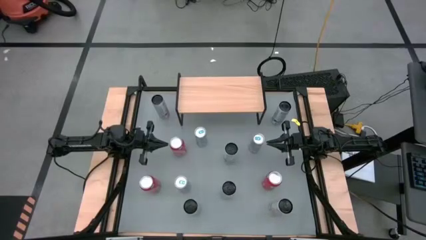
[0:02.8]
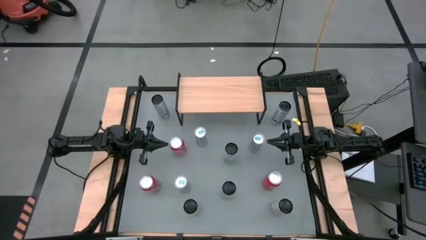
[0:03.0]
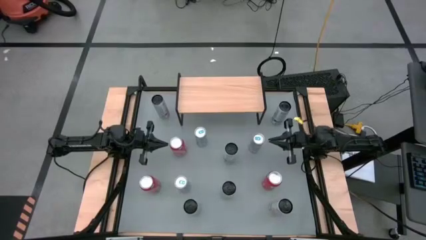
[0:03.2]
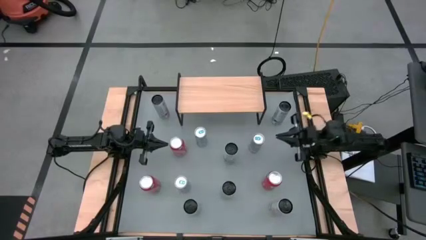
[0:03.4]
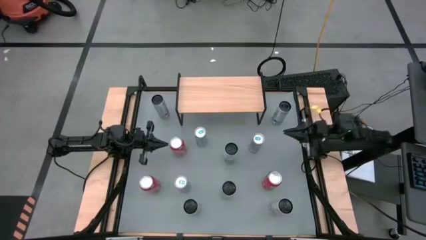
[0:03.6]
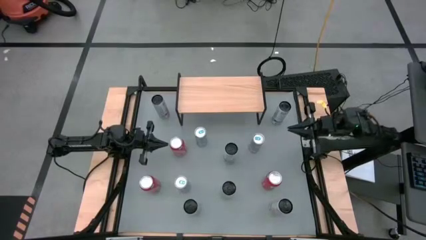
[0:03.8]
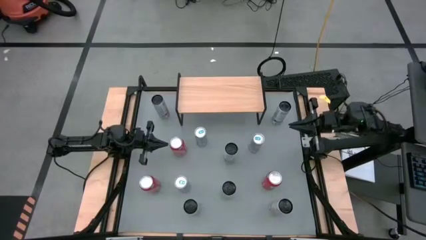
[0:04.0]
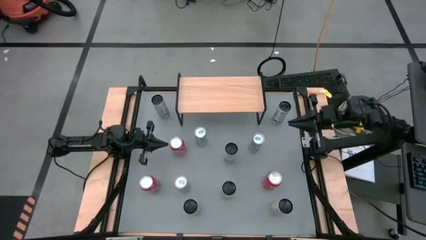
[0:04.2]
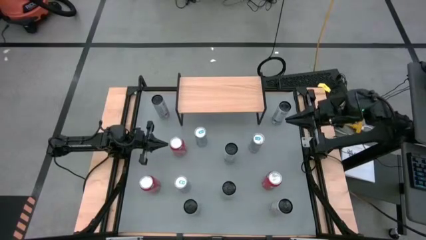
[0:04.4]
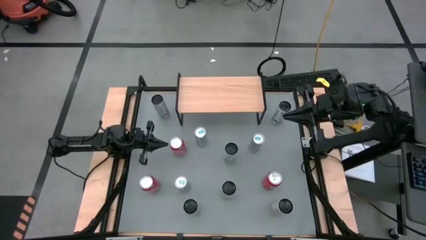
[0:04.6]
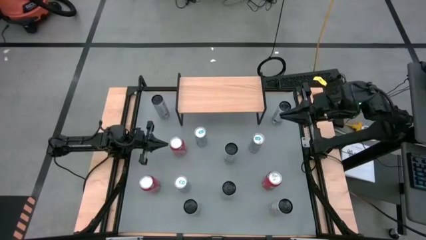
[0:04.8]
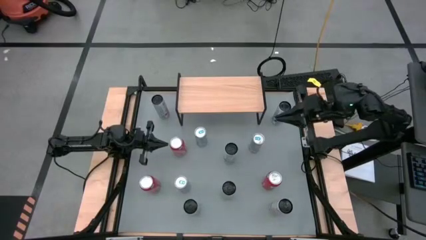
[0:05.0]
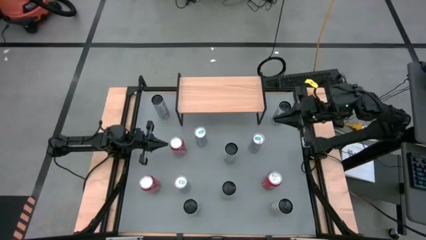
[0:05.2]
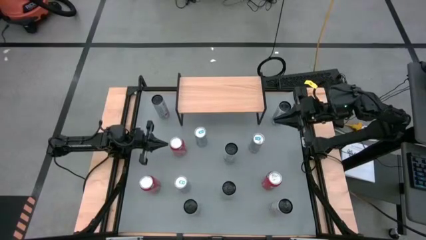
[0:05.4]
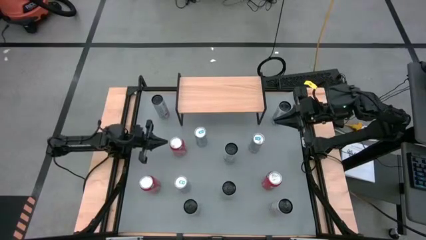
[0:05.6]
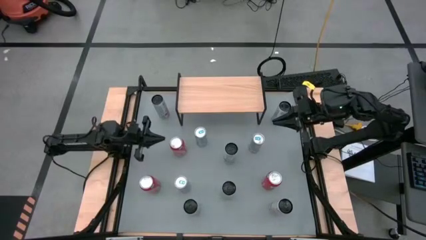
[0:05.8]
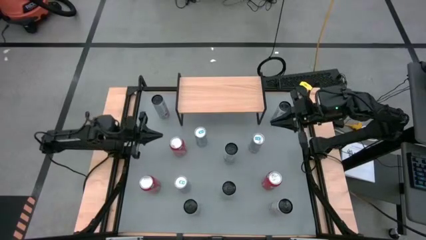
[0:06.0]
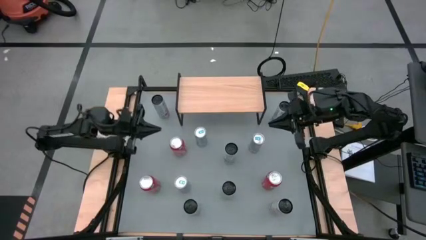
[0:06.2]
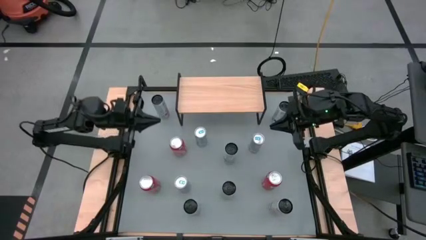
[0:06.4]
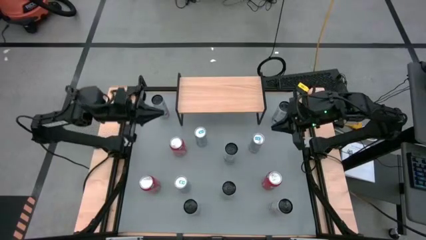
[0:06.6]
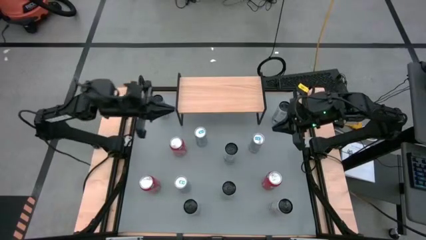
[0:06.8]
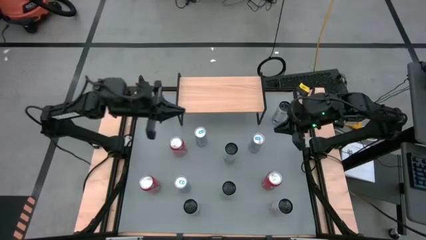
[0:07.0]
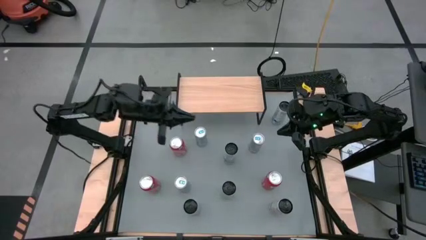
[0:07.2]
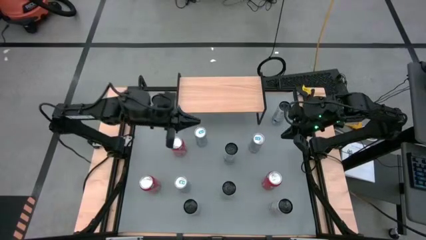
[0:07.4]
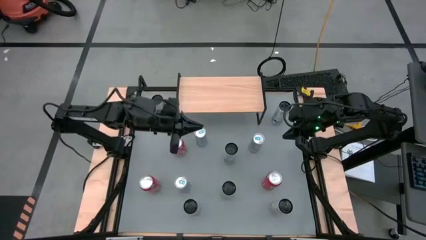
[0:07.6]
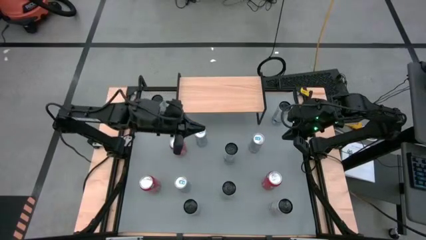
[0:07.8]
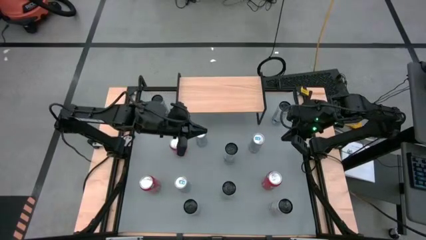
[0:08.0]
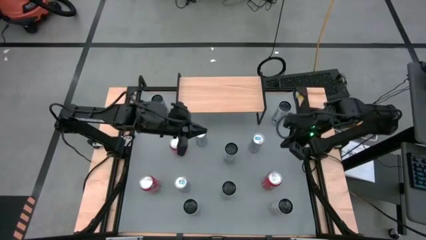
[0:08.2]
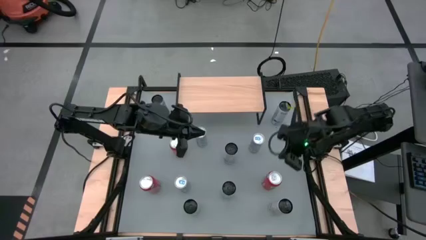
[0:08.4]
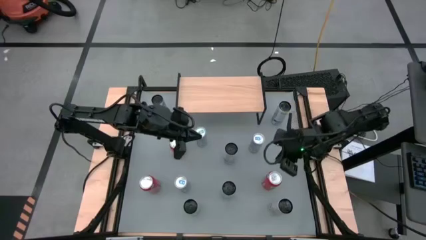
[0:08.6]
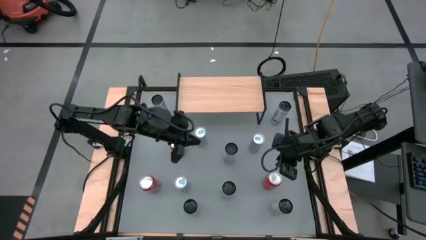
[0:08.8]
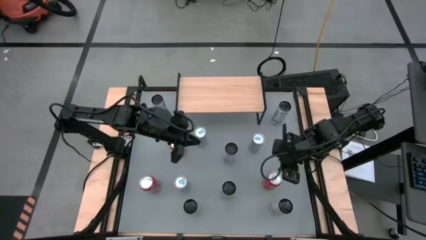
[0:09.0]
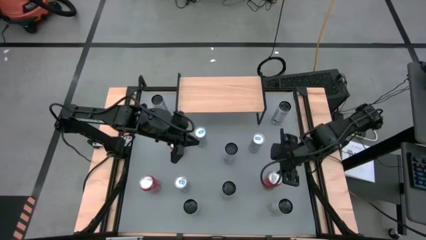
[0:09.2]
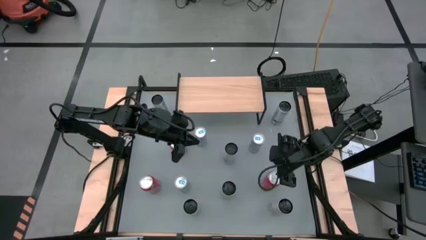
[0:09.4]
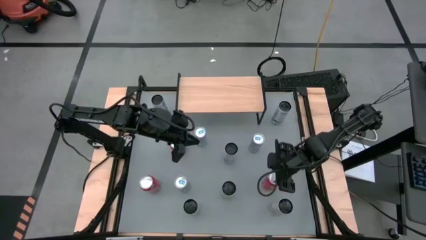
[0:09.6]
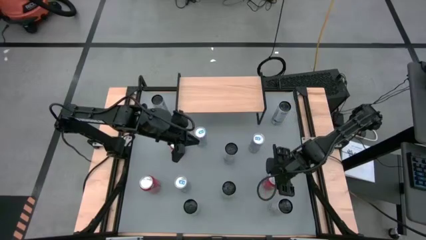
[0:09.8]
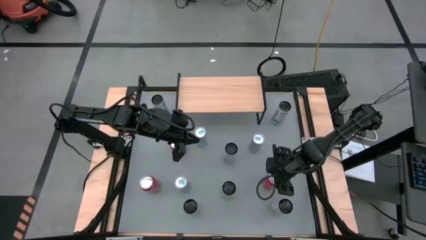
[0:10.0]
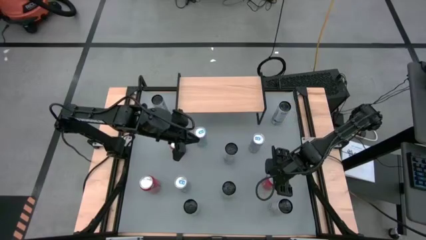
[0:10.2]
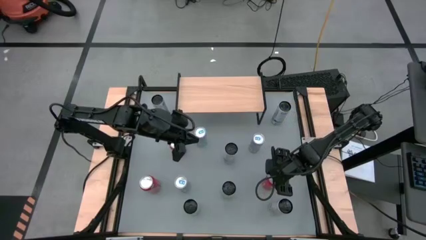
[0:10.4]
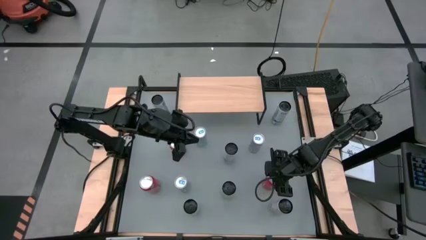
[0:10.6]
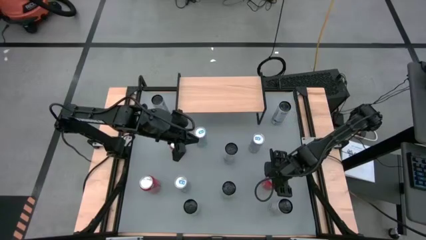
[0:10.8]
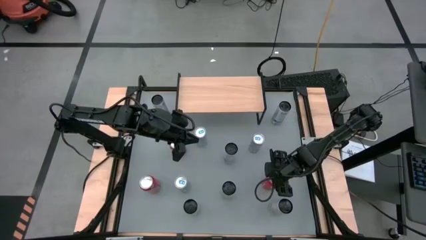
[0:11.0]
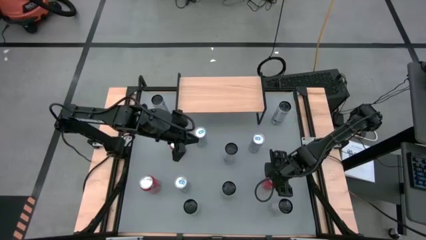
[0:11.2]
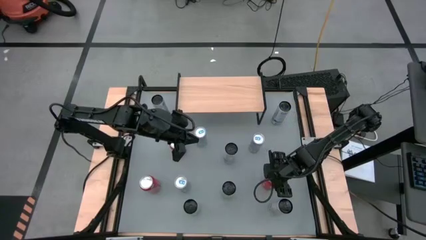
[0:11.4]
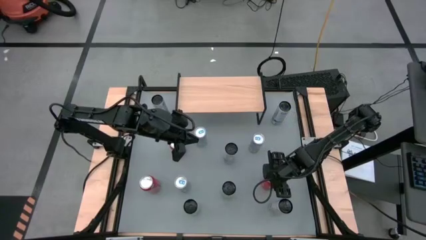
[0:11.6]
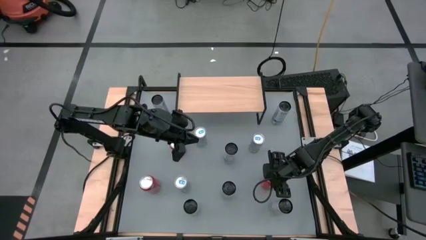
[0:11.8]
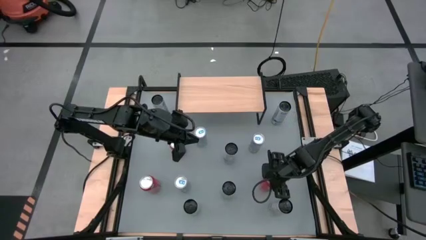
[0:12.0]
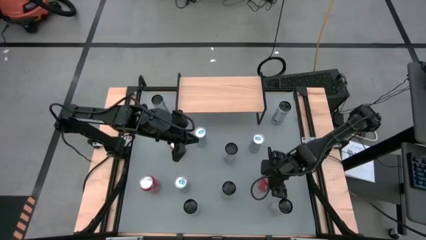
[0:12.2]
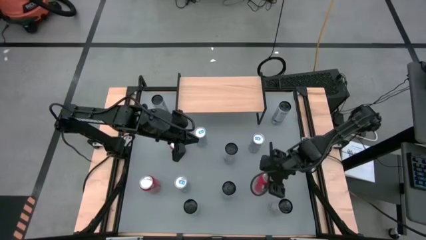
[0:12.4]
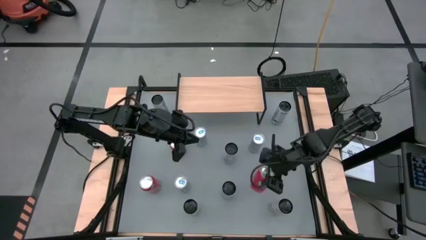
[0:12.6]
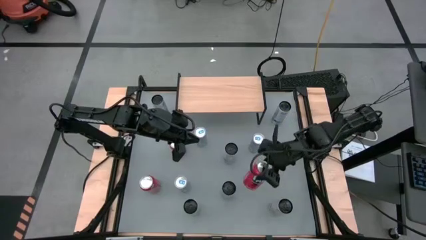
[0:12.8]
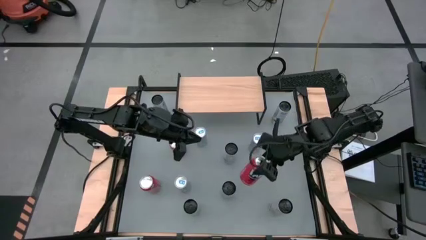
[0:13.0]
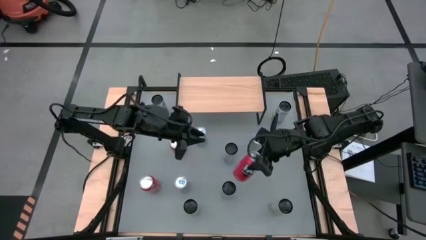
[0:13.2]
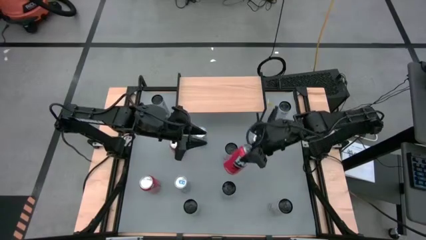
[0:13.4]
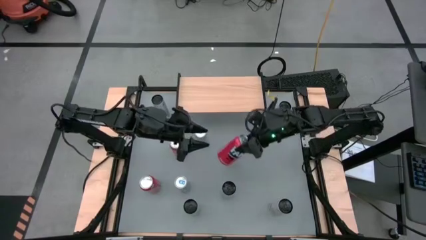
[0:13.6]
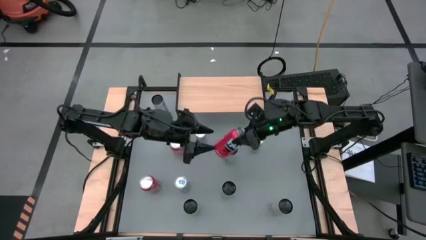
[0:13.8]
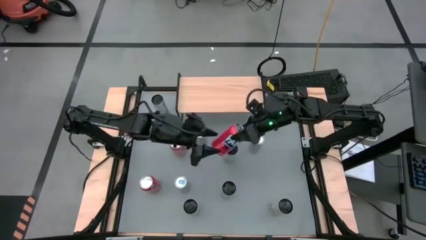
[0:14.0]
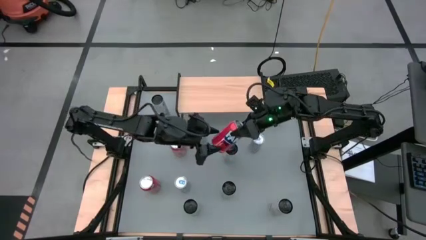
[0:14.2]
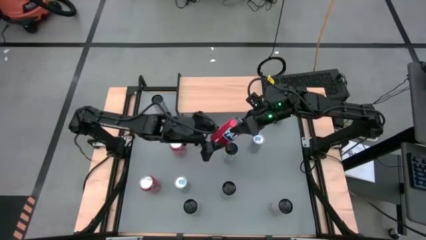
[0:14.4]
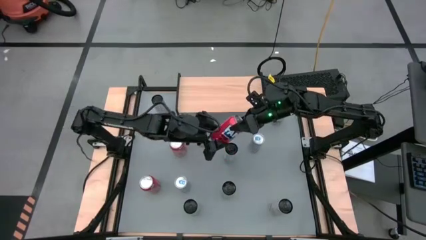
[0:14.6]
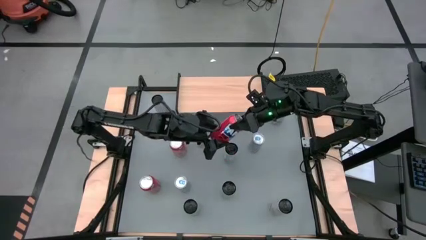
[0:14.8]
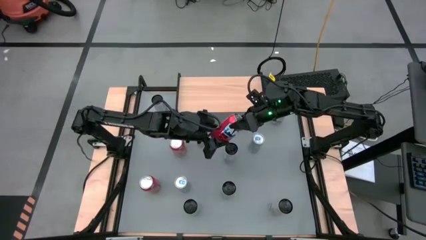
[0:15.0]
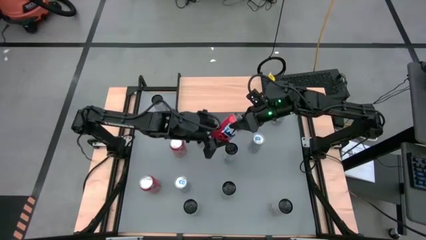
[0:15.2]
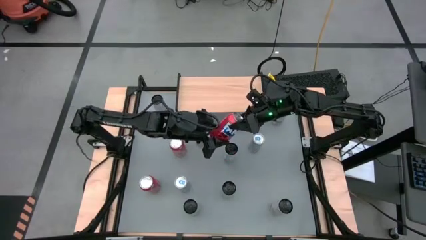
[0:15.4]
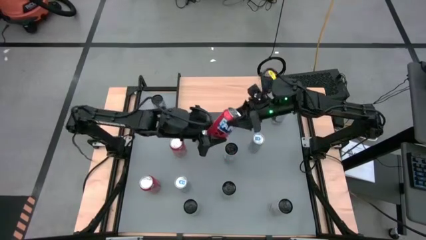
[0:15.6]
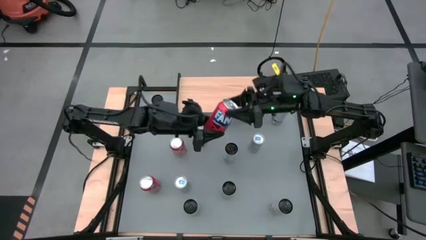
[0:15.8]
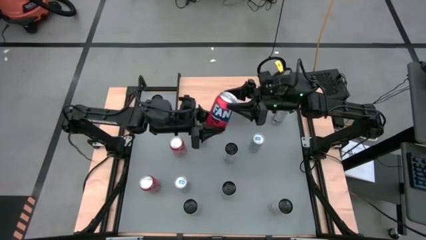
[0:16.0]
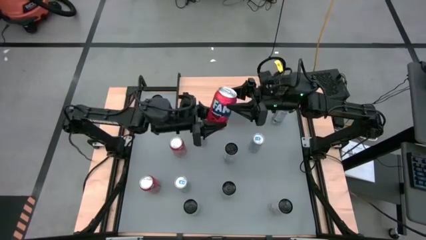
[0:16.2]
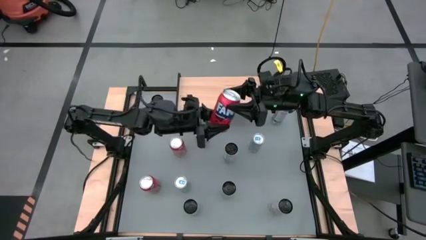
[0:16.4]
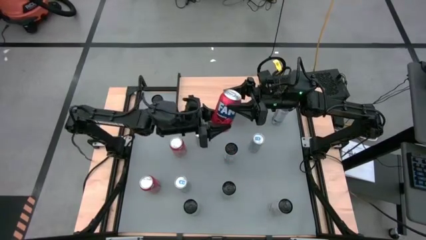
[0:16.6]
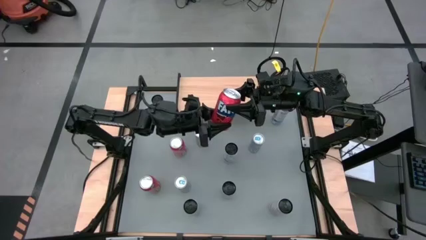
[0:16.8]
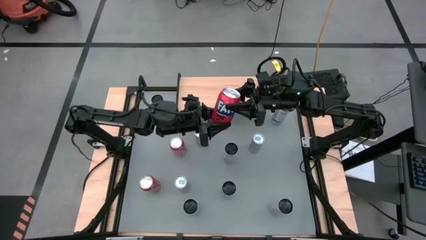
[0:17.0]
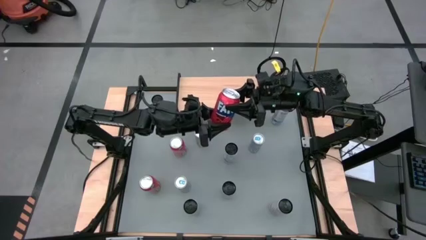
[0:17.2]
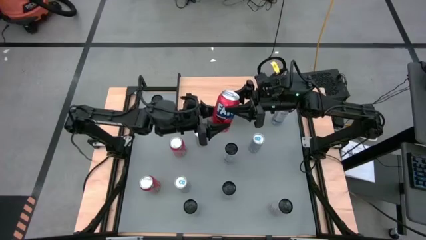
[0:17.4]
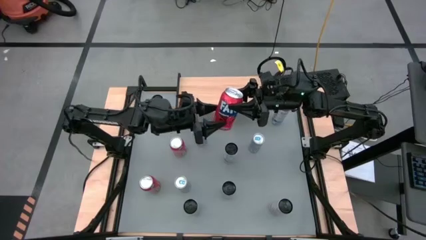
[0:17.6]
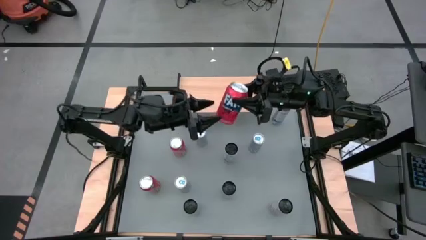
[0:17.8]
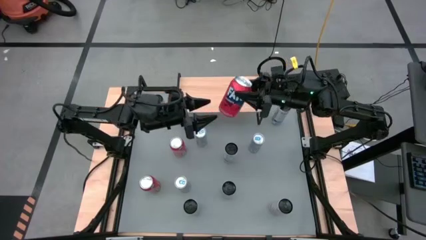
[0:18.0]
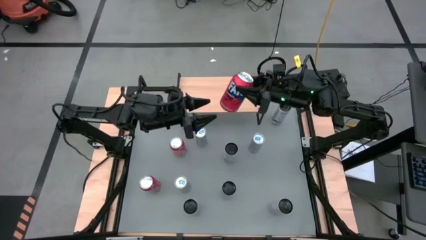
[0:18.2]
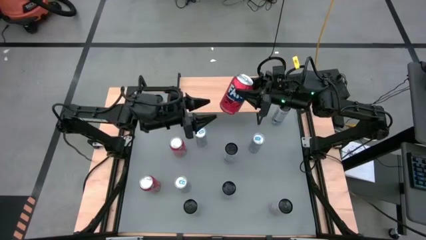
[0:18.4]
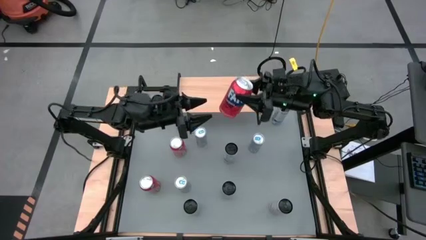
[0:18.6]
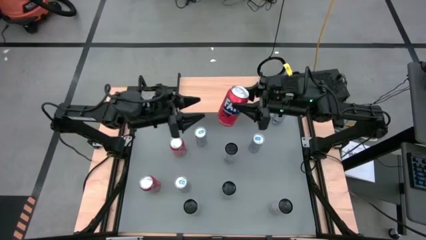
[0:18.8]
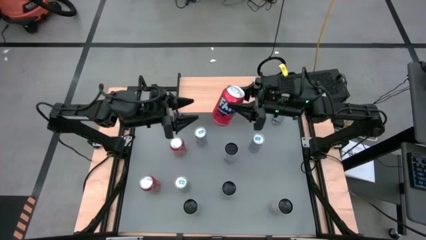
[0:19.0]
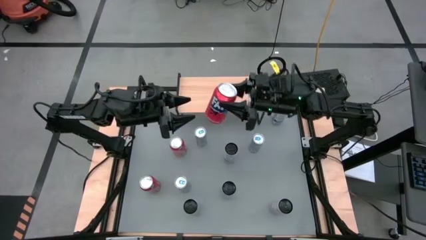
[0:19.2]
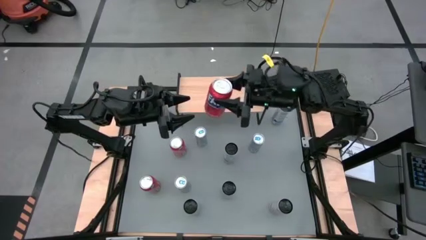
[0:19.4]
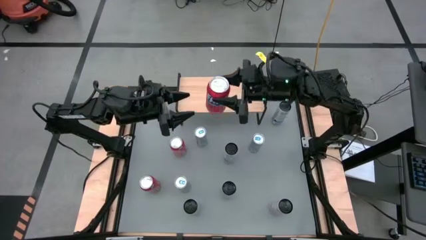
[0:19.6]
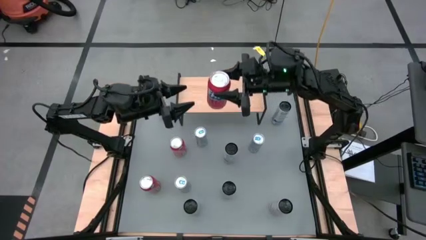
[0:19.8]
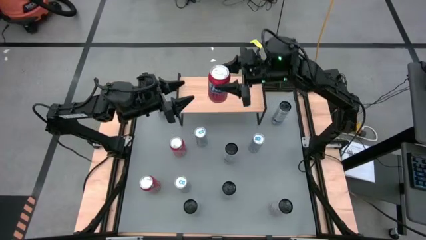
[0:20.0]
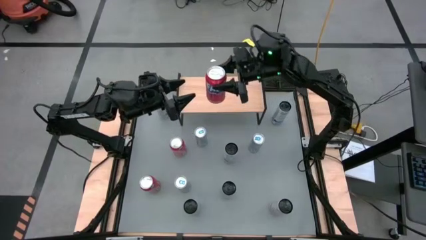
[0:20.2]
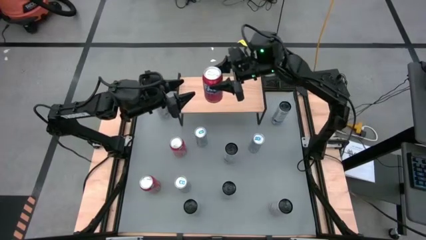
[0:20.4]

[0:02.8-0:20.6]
Task: Place canned beverage on shelf
Put the bottom right red soda can on the shelf
